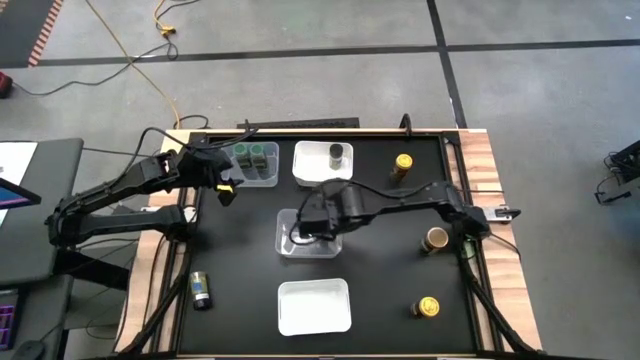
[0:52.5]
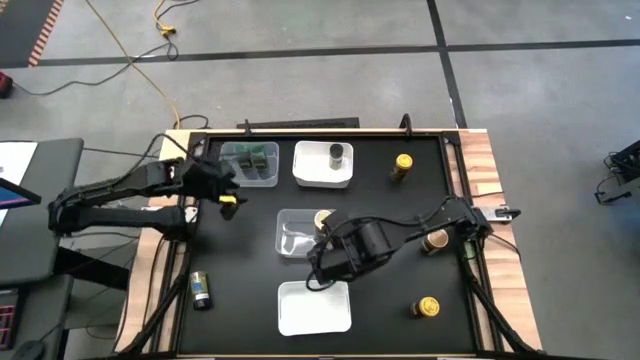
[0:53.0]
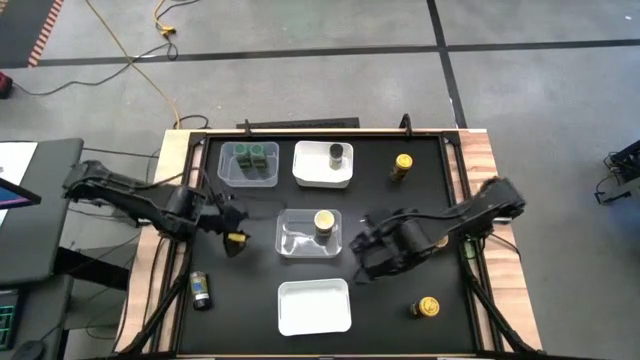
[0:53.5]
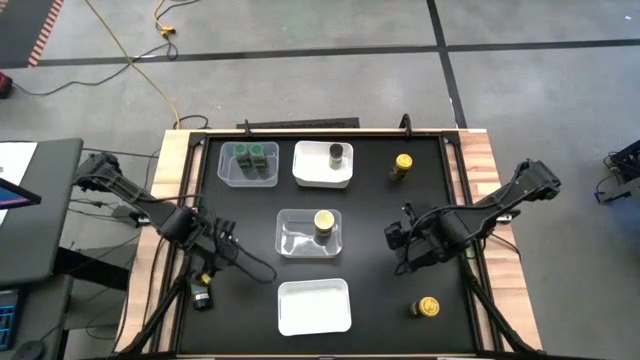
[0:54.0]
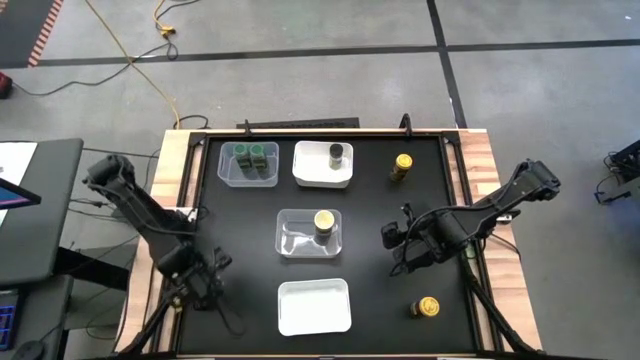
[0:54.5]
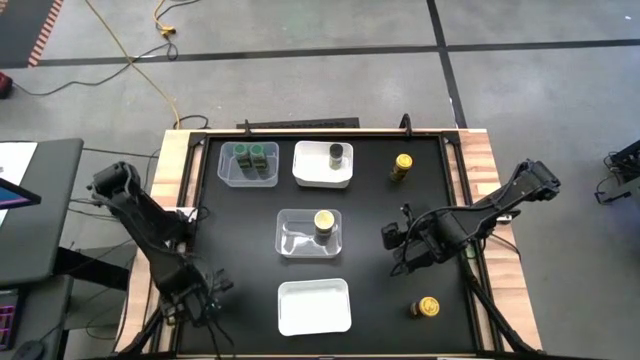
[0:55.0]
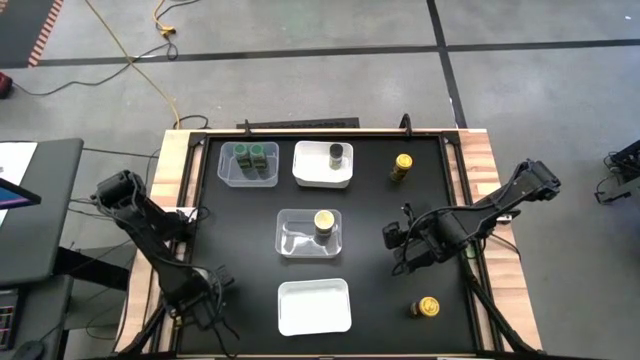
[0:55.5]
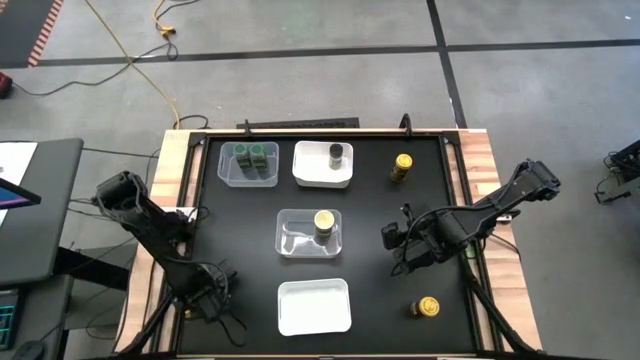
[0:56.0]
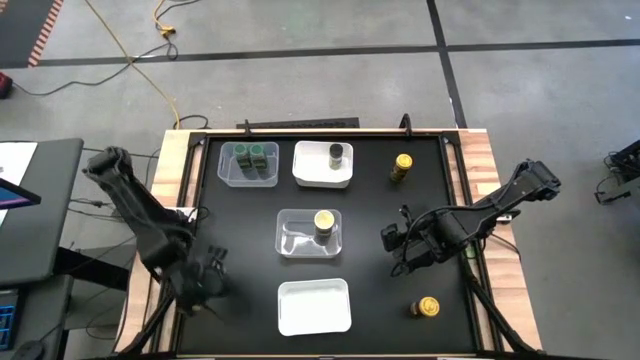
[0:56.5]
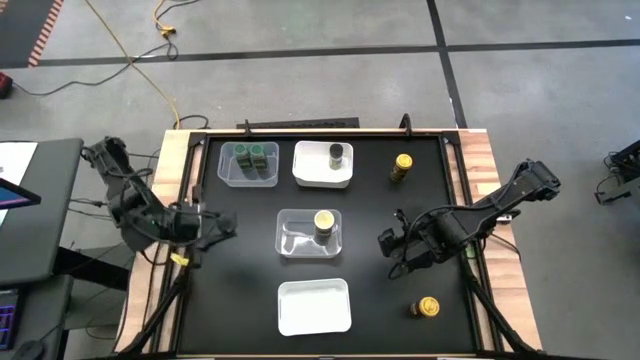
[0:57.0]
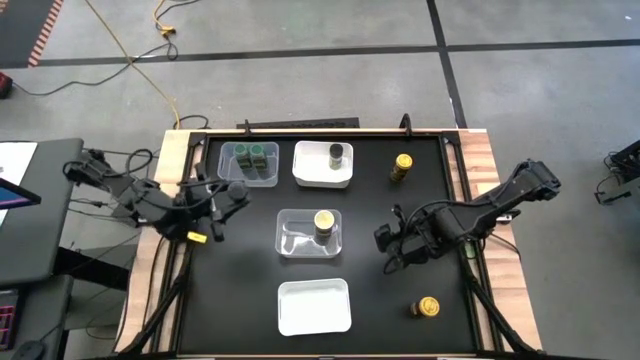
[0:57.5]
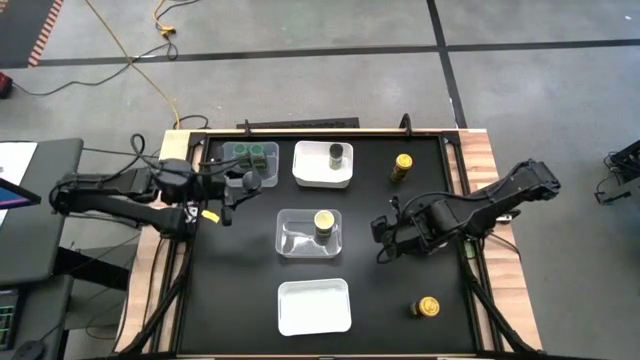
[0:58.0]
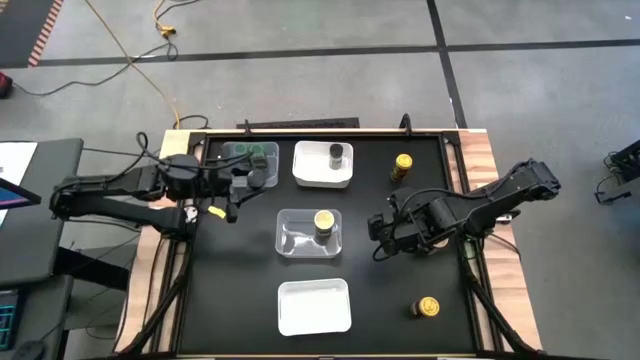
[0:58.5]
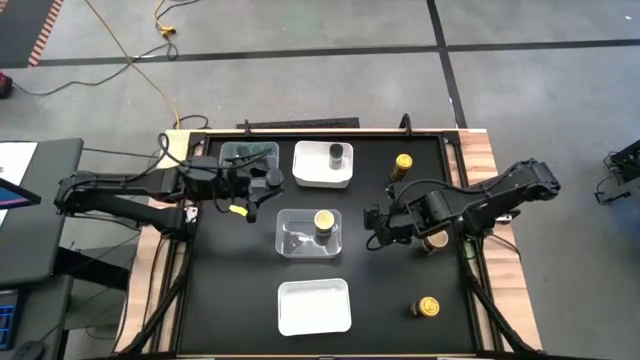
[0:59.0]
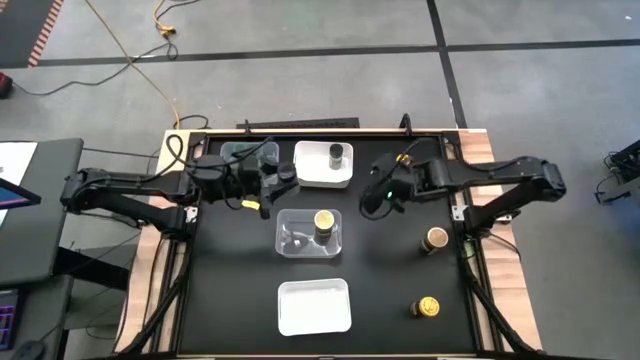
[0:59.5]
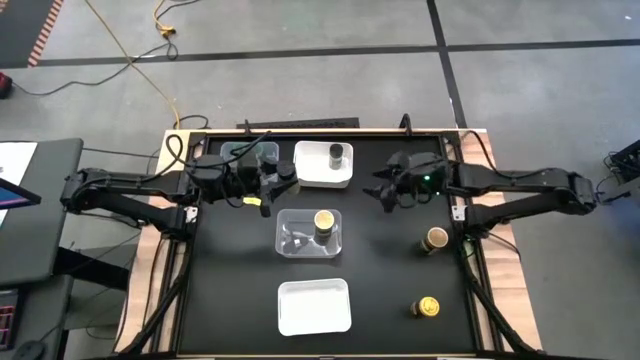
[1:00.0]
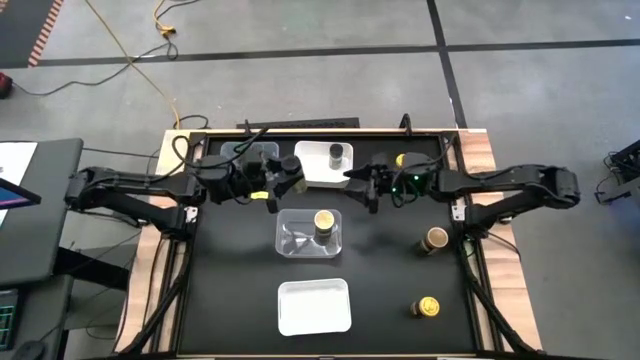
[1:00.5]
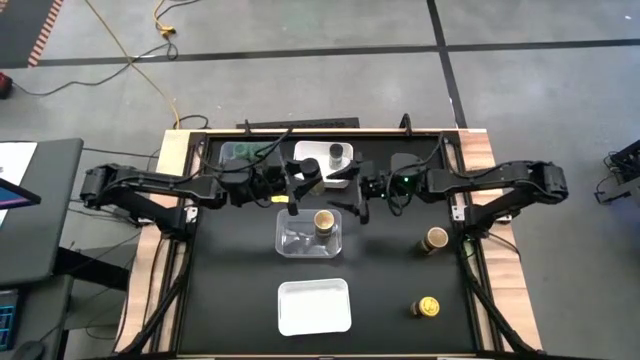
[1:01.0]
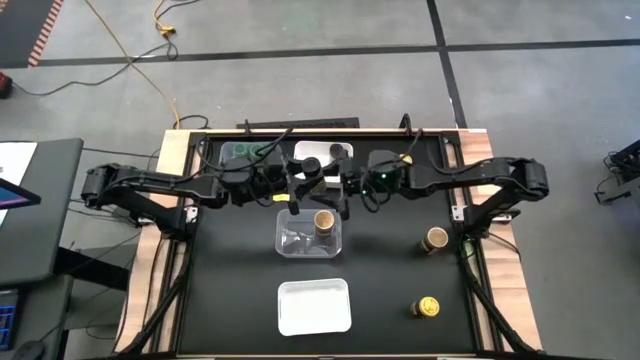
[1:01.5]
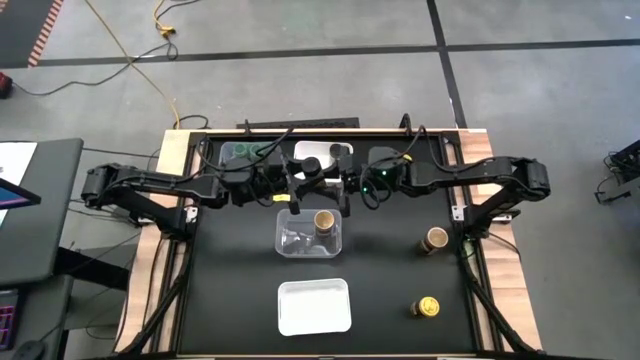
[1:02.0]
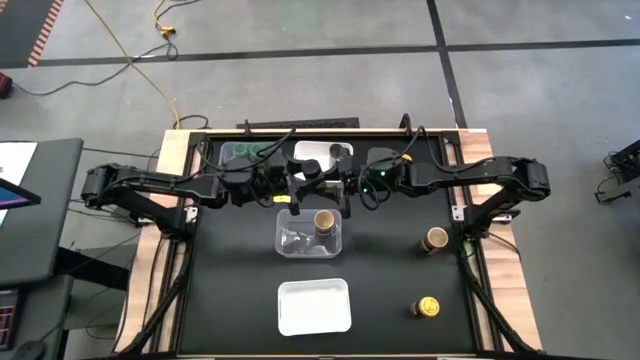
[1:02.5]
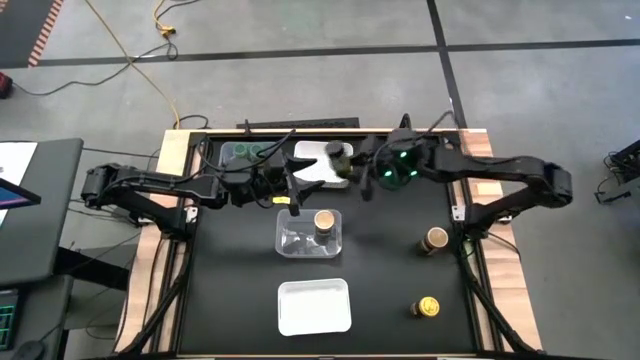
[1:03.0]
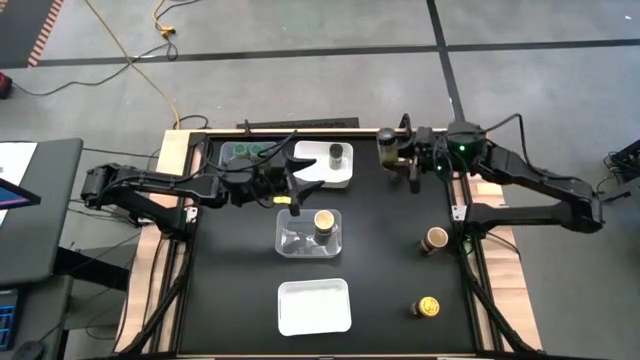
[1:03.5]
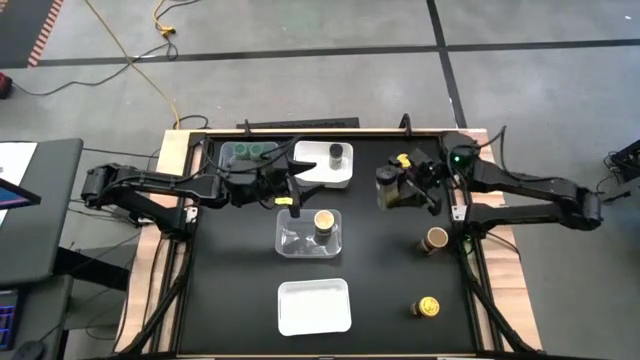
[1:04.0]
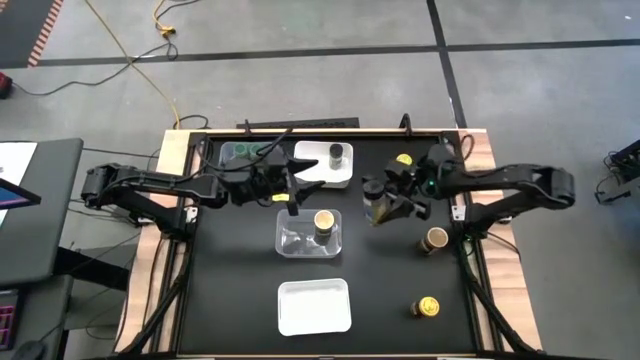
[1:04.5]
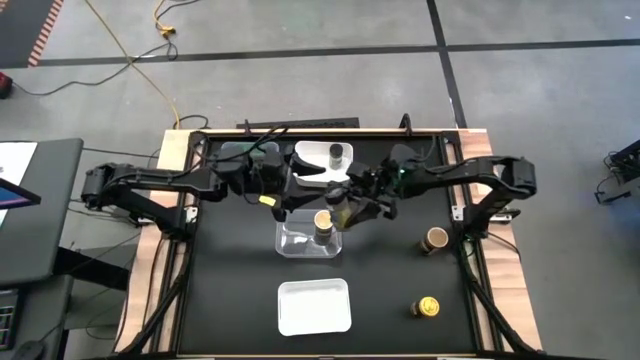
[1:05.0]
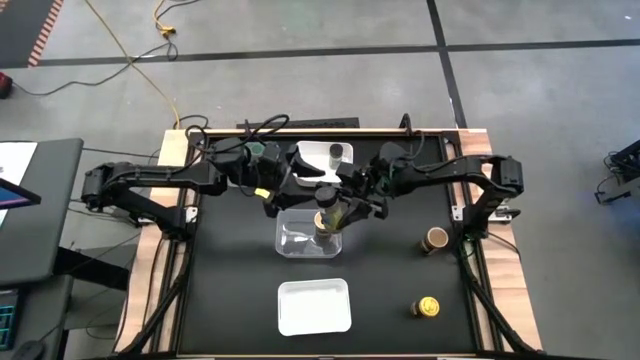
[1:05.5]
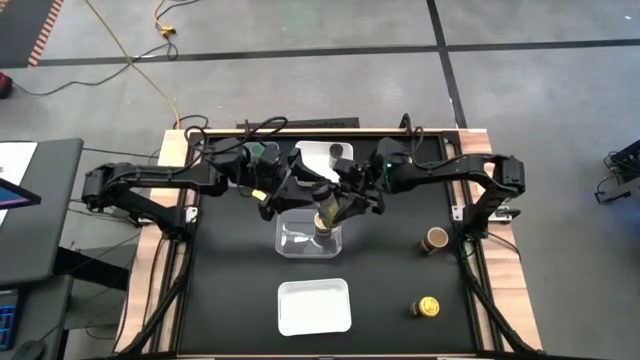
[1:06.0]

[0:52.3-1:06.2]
Task: Sort spices by type
Put the black seasoning bottle into the top white bin

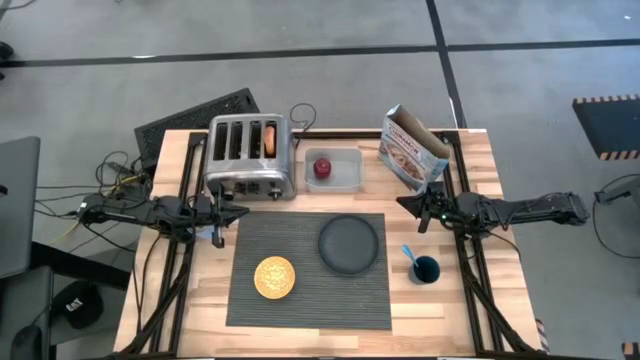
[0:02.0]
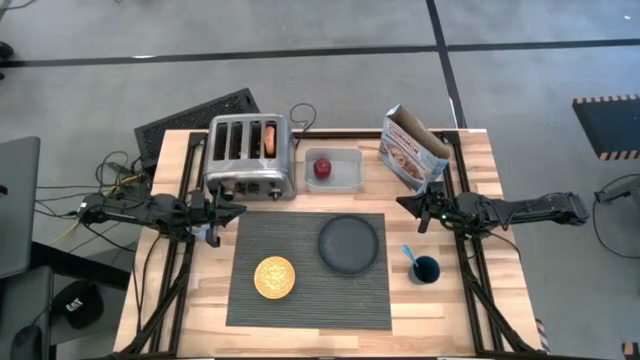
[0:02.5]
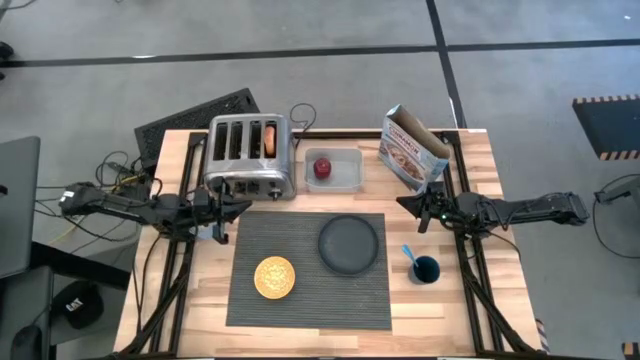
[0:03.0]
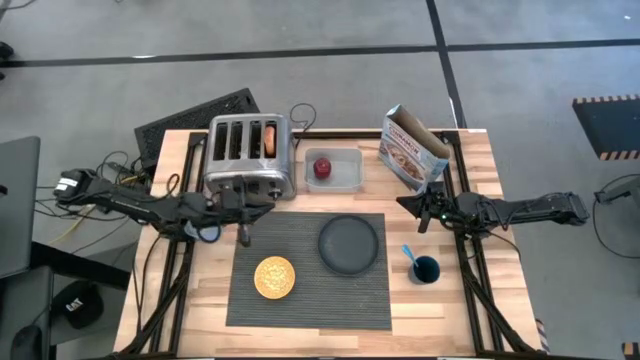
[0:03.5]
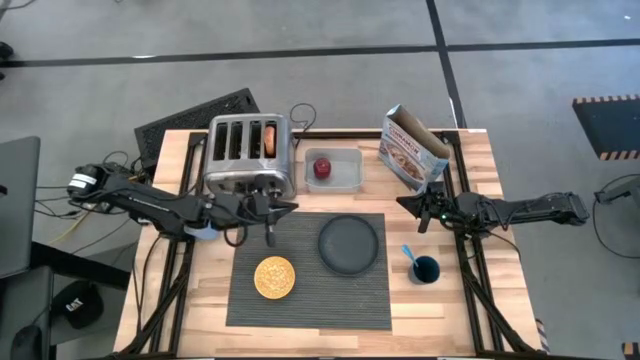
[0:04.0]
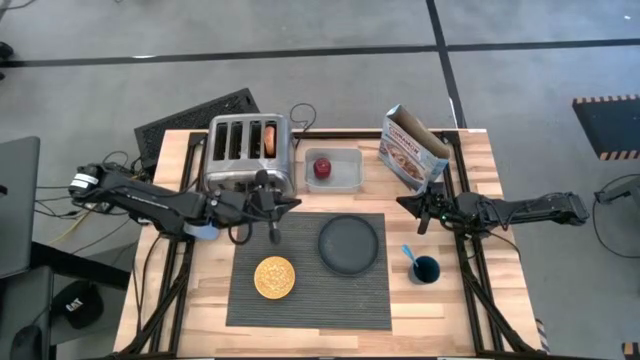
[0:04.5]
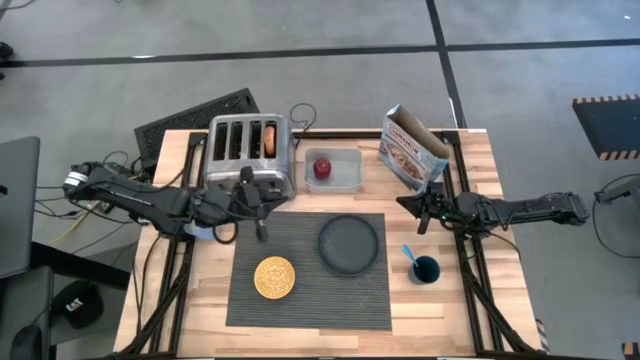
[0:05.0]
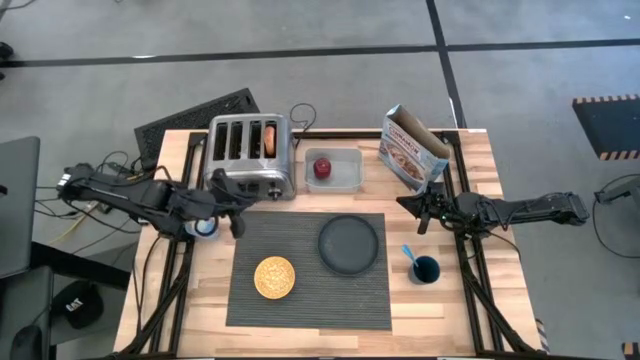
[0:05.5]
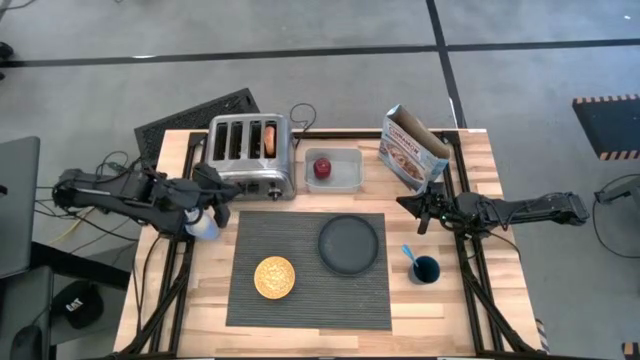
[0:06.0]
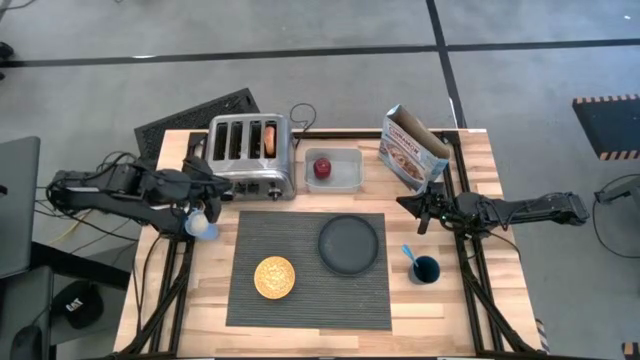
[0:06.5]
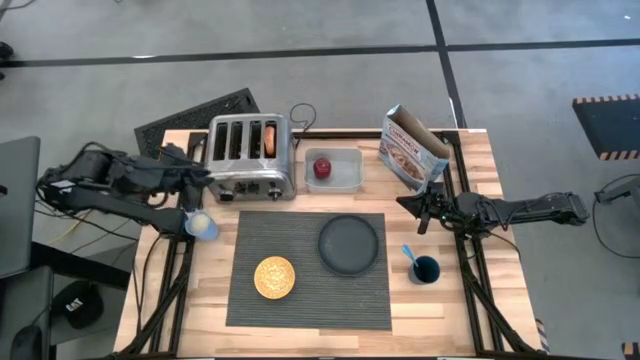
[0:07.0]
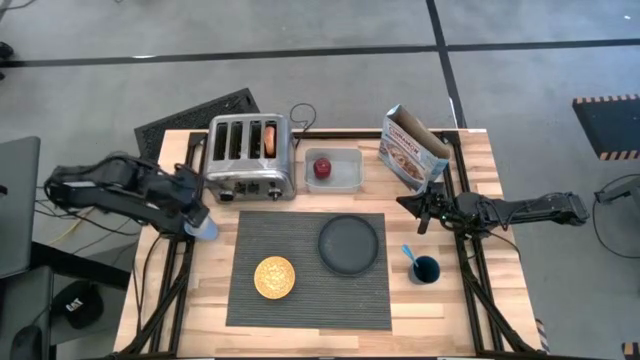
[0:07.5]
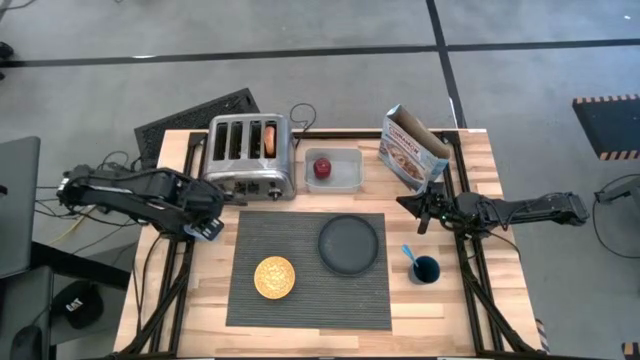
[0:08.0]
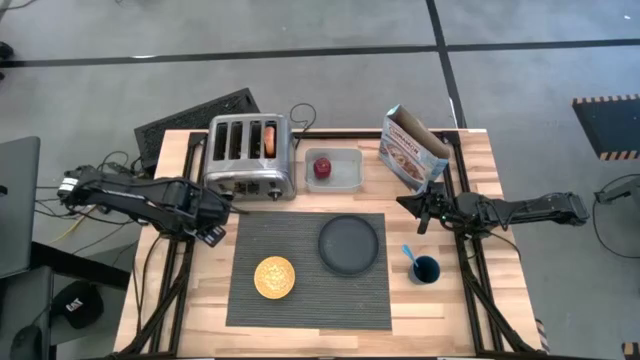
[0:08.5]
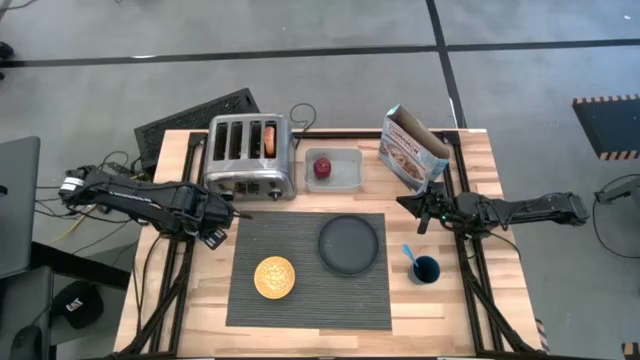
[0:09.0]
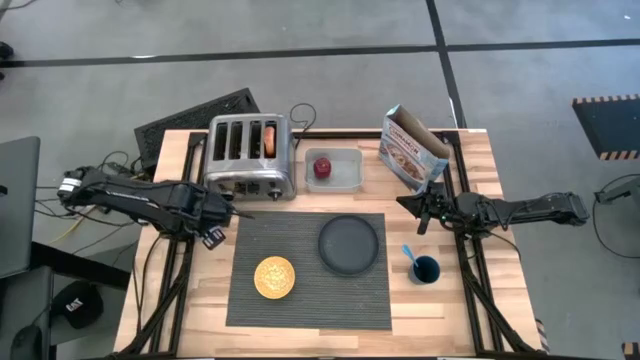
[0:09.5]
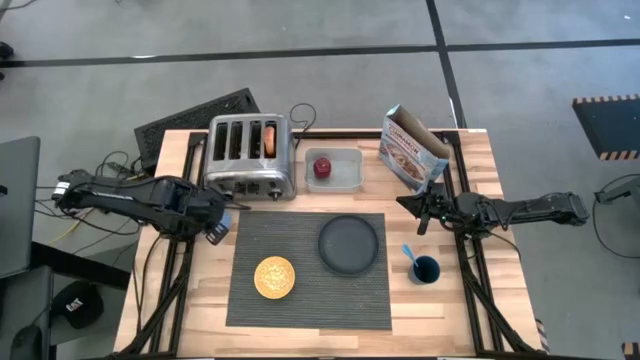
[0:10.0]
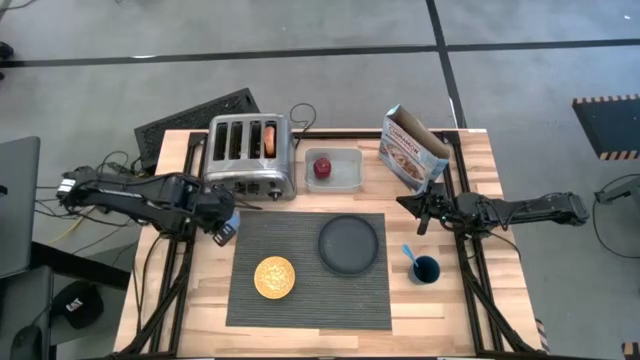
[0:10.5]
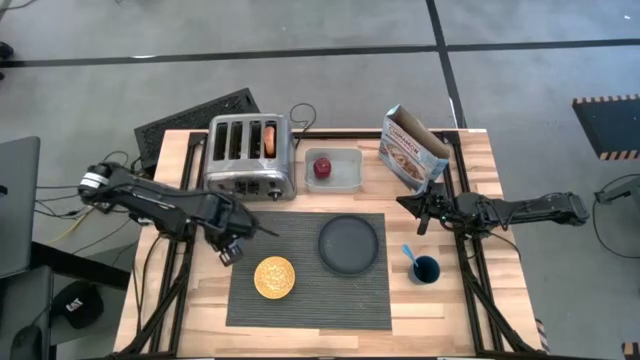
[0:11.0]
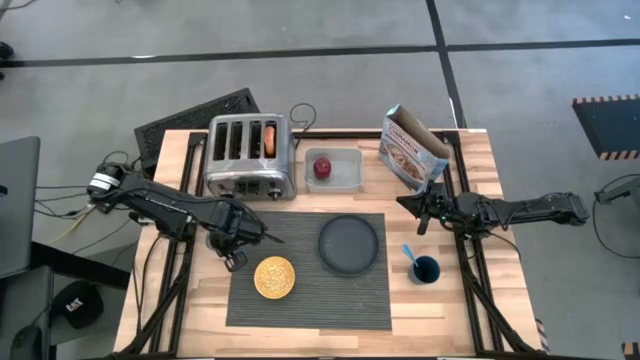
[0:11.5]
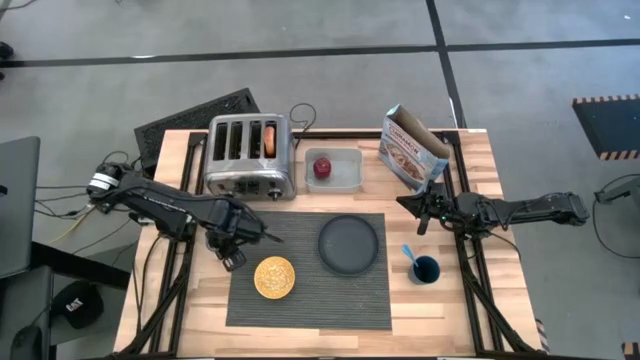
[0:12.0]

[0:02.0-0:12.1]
Task: Arrange a breakfast setting
Put the blue cup of milk on the left of the black tablemat
